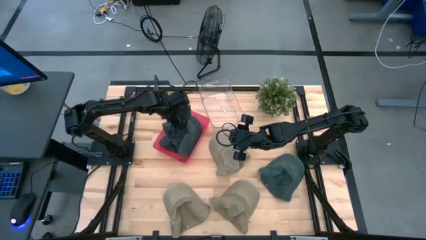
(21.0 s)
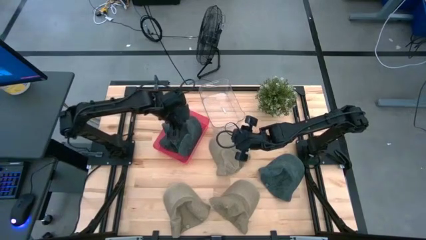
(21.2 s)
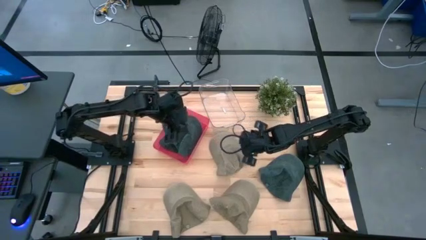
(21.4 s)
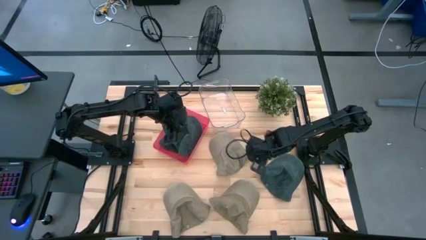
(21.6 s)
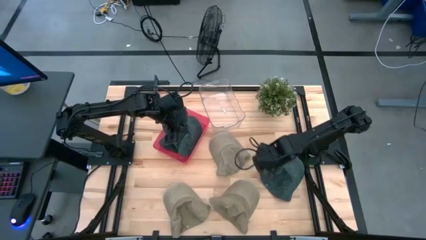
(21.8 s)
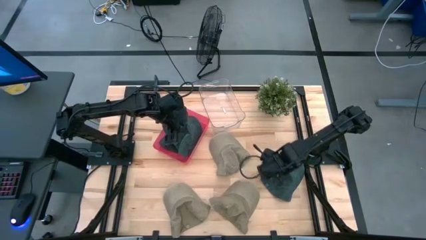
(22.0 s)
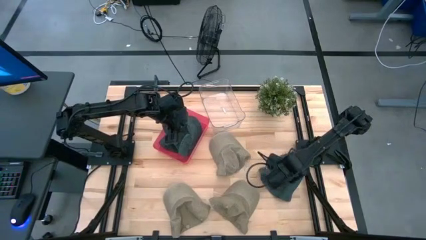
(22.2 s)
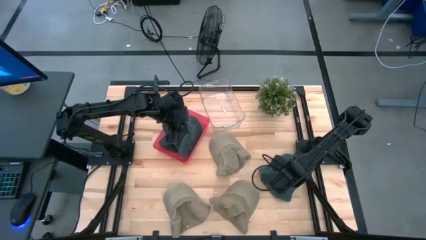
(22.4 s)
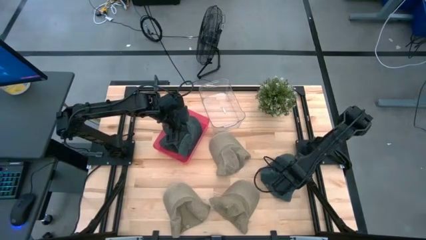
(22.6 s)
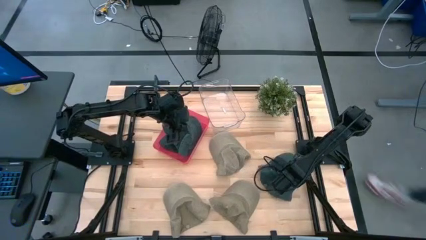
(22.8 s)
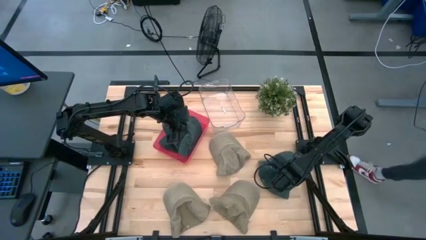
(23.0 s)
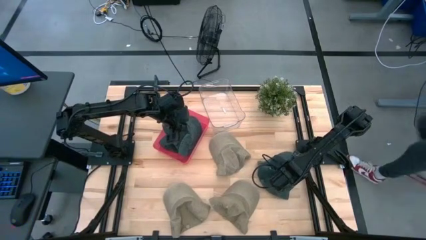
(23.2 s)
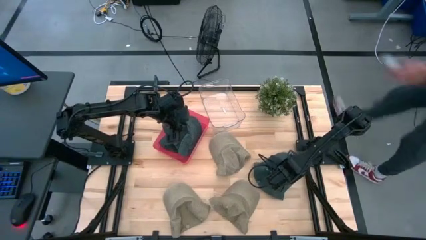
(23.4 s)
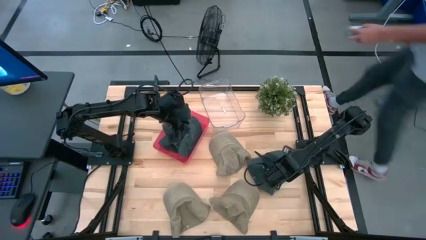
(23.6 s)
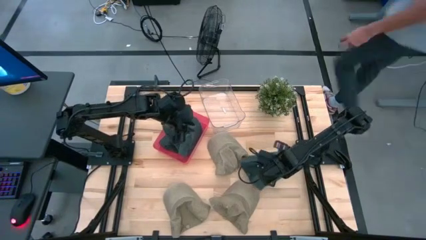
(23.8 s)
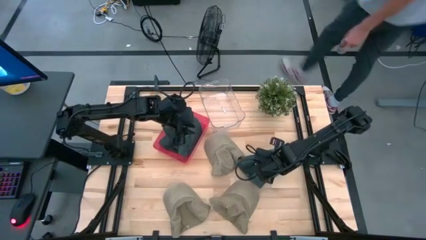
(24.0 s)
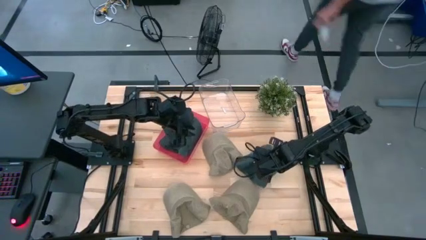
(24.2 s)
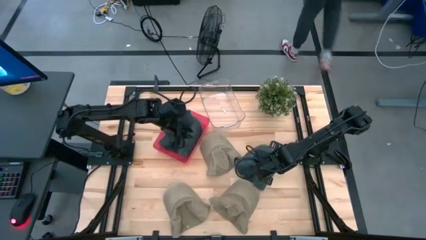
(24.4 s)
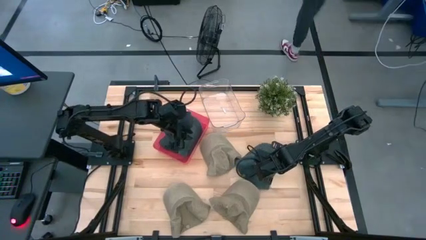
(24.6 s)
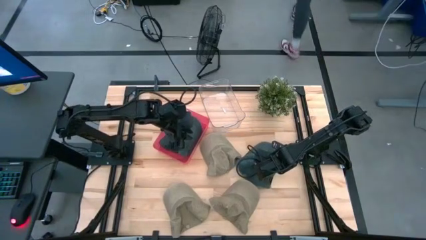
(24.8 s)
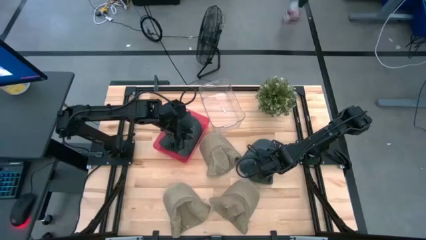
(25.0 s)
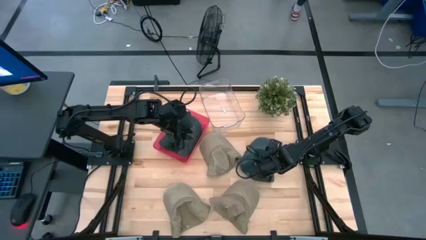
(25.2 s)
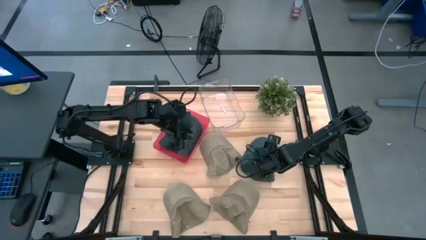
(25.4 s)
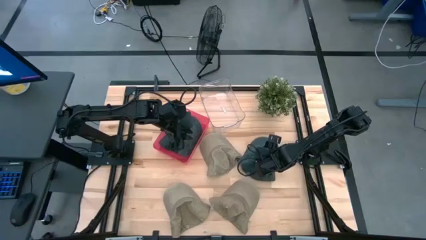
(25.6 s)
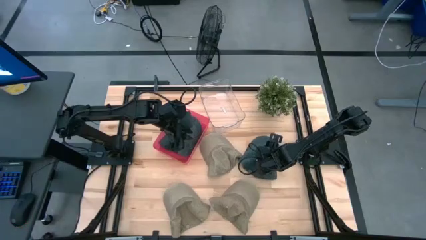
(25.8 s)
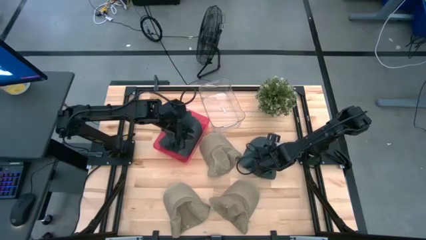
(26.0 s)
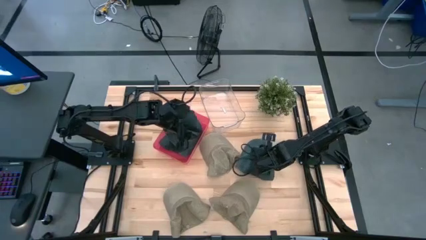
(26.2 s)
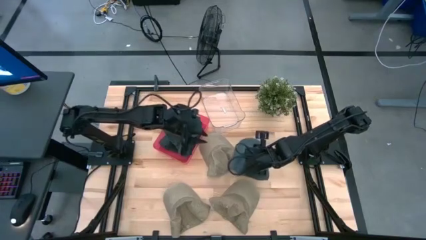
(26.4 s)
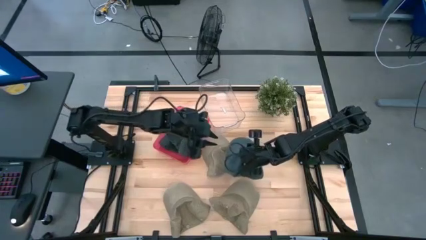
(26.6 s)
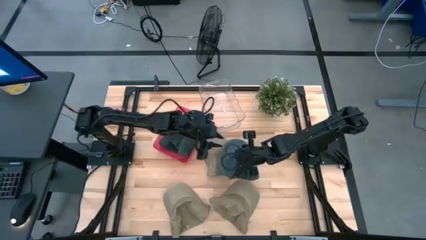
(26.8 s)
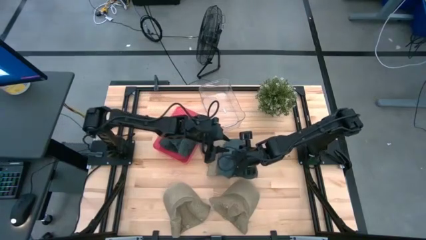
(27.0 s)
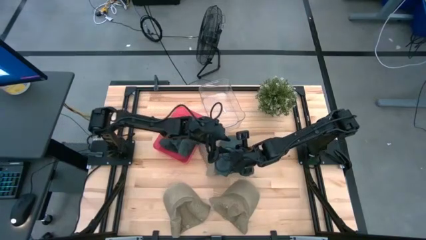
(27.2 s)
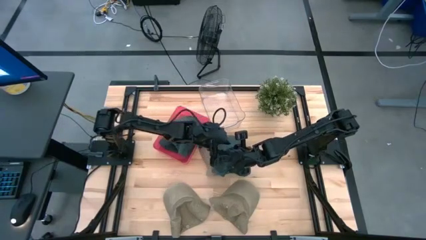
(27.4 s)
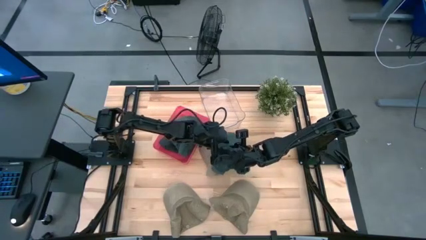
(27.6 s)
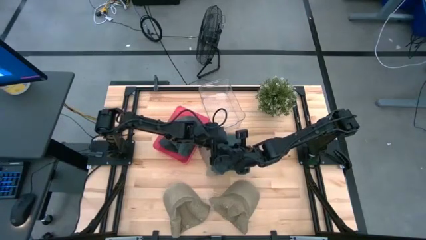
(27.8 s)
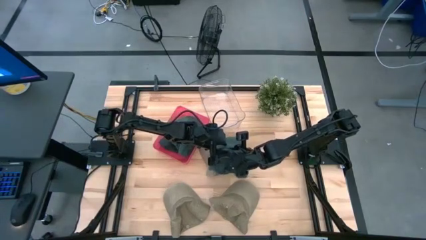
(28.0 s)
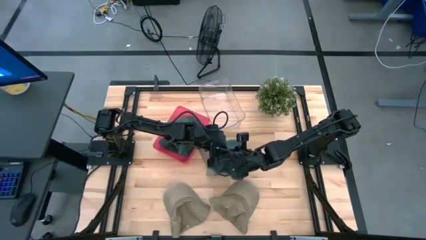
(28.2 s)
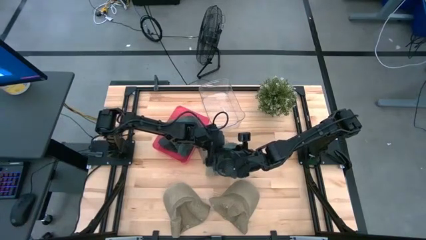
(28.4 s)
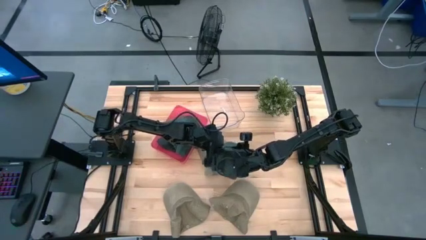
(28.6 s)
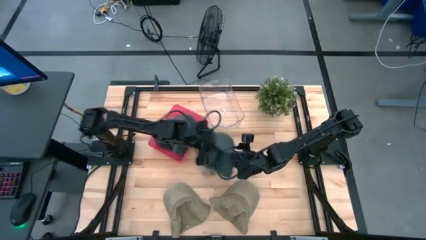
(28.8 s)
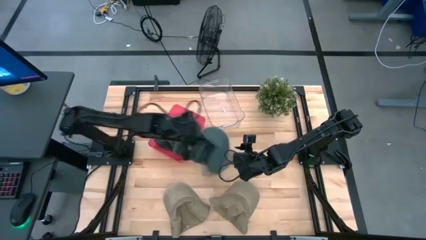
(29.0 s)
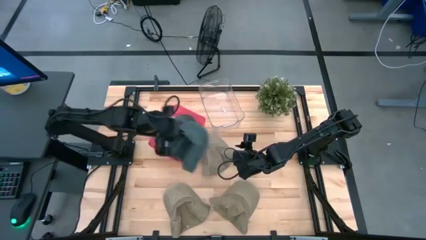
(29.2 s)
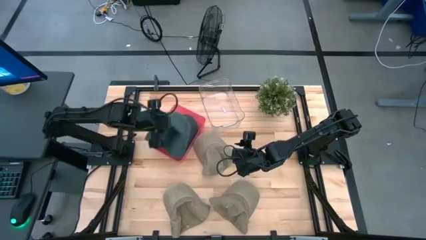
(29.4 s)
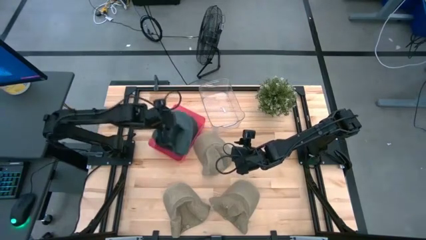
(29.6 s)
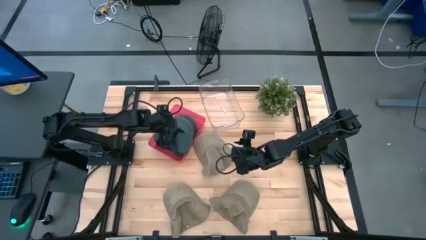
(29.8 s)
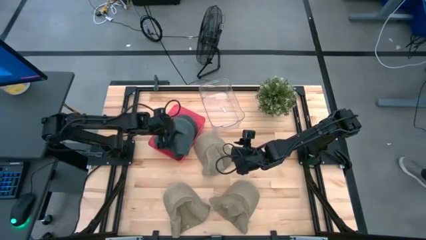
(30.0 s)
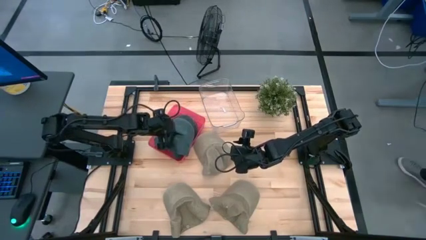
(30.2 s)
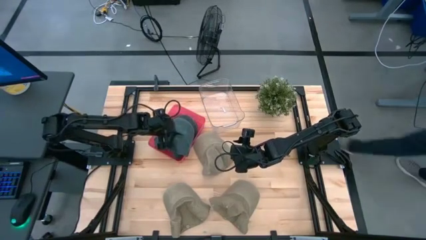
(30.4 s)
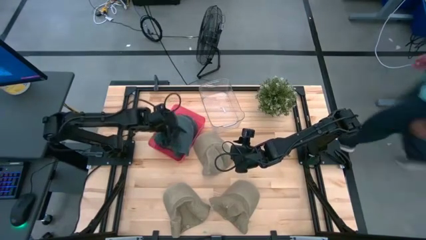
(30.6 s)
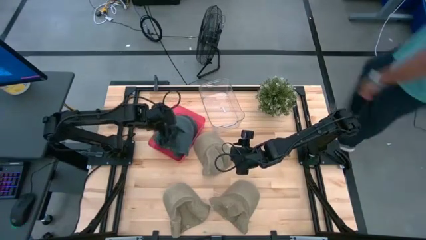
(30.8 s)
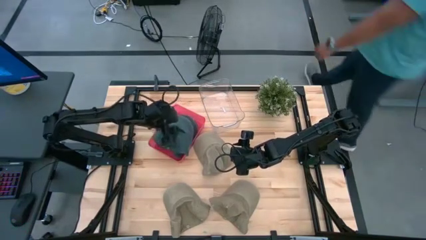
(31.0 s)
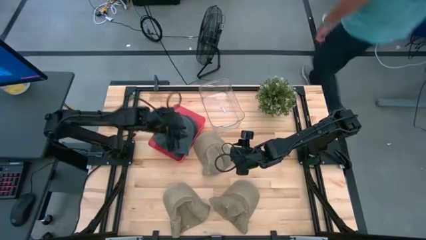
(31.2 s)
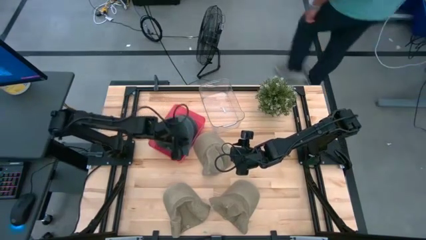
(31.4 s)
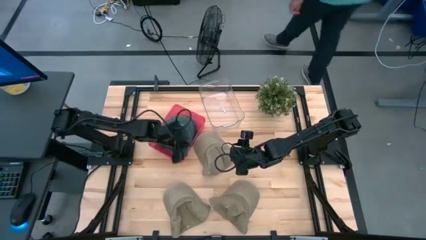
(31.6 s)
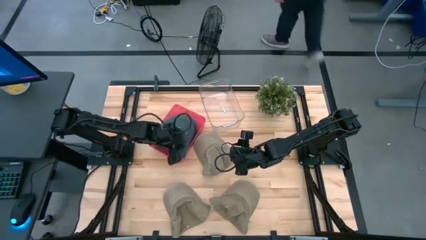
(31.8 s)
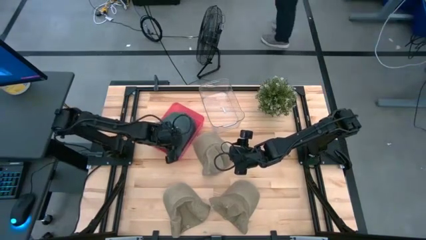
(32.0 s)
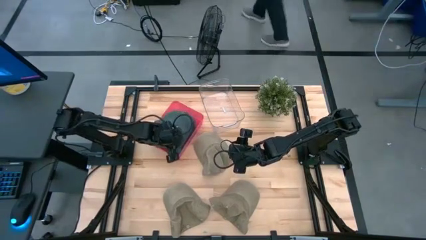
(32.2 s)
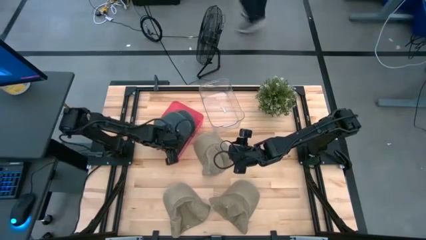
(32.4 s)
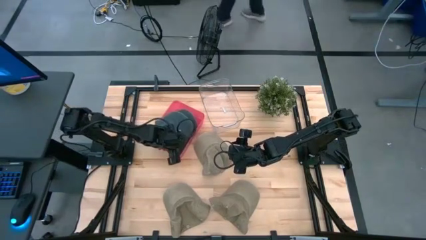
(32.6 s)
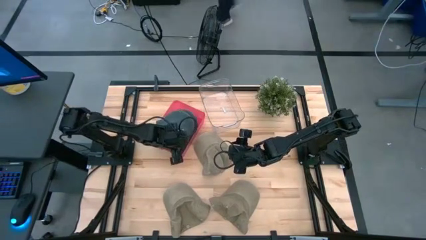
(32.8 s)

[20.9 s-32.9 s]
Task: Pick & Place hat
Put the blue cap into the red bin

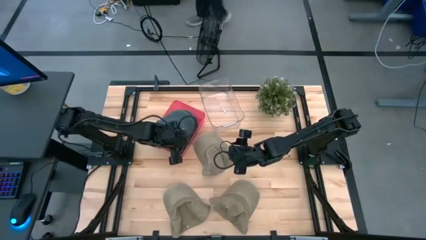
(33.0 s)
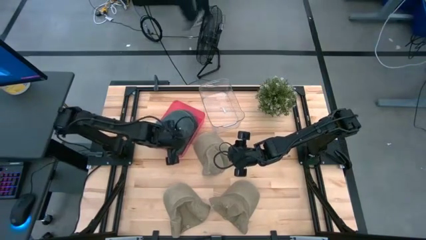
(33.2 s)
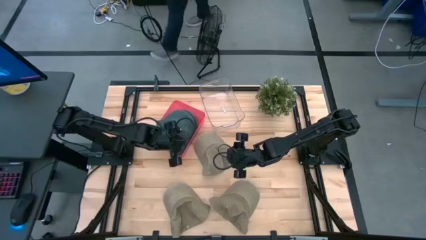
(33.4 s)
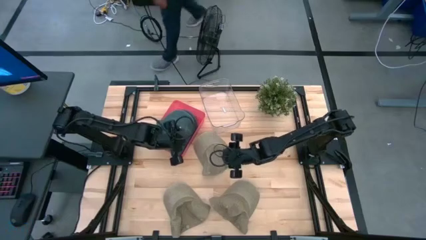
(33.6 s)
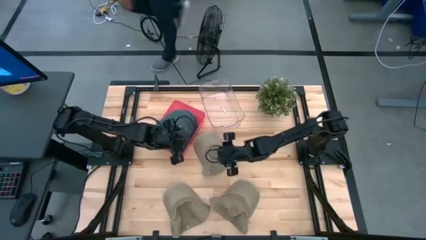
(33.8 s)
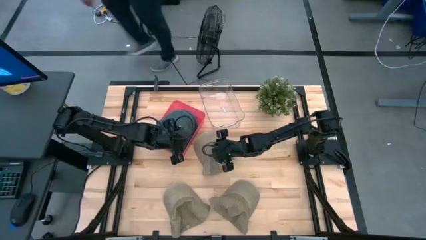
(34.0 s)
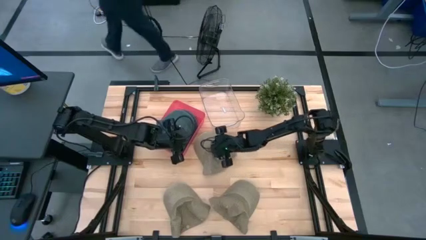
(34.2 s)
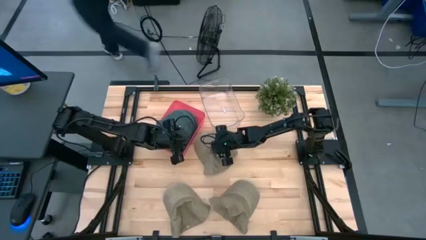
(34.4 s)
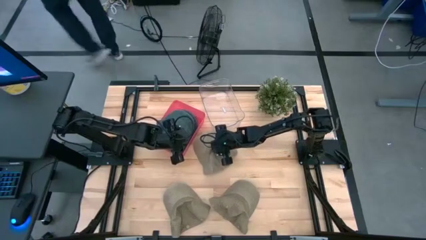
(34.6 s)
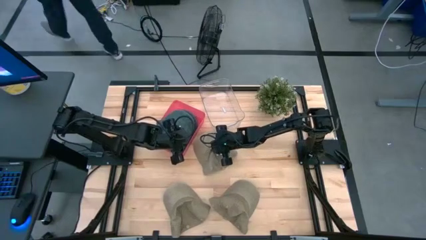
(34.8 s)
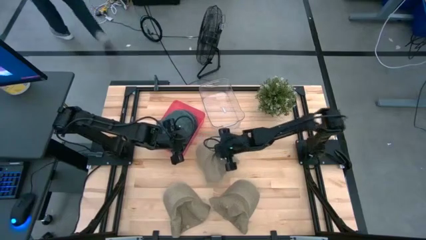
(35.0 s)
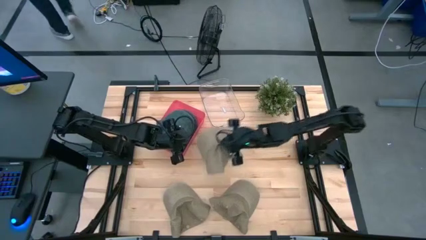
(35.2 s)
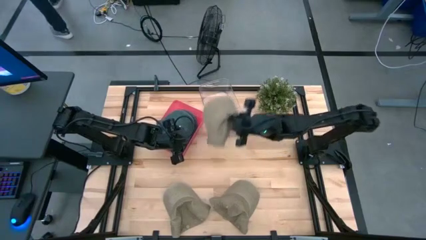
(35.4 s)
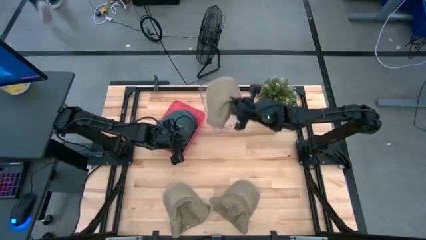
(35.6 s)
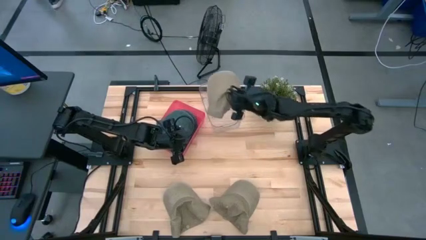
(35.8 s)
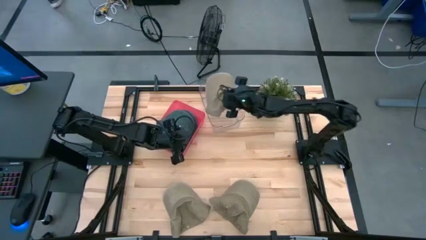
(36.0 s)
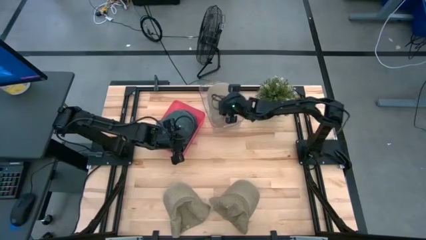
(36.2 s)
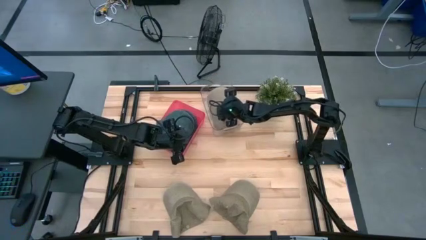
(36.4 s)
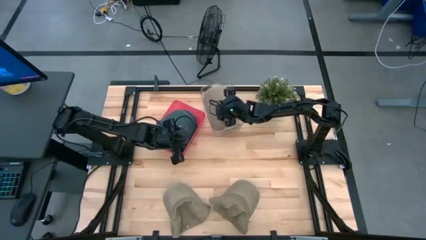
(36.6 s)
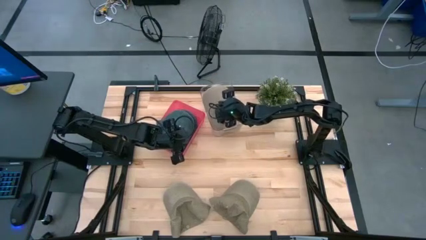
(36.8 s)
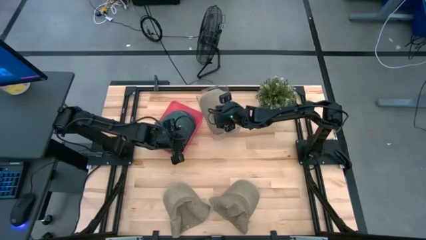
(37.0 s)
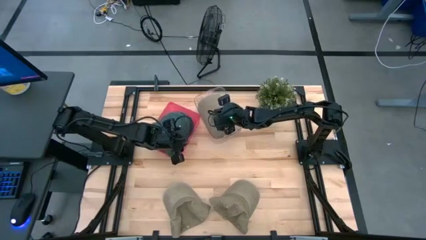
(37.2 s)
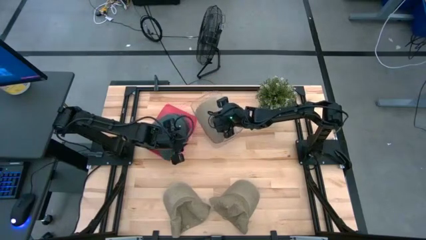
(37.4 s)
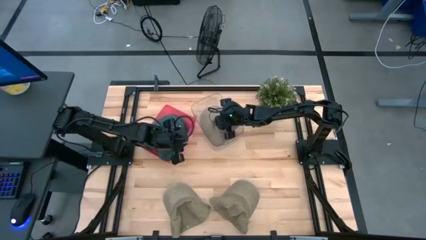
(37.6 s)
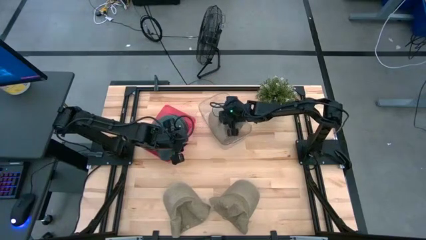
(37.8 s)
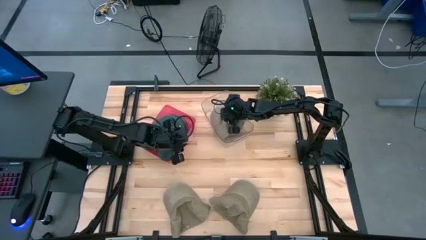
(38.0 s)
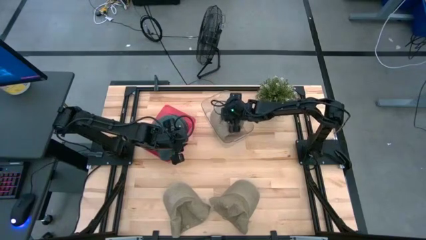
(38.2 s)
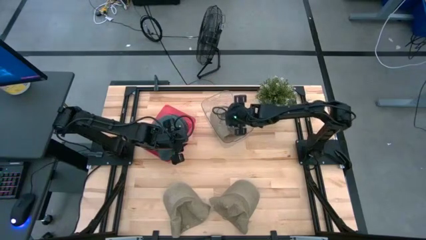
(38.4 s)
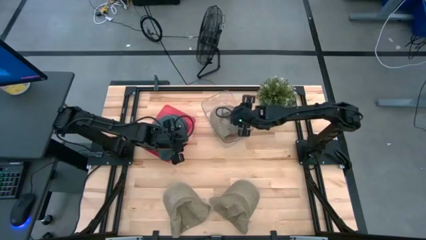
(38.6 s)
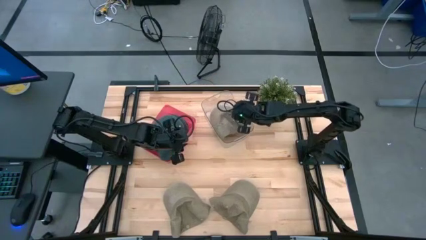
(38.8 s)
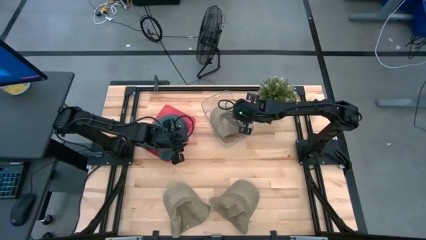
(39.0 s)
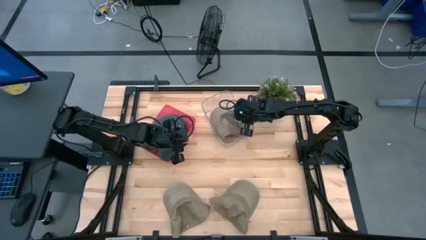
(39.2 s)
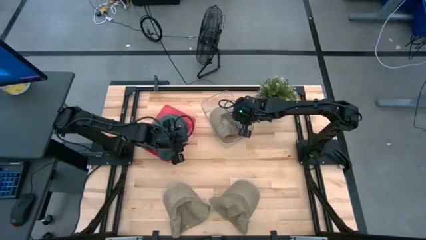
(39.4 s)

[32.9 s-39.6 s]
Put the top brown cap into the transparent bin
